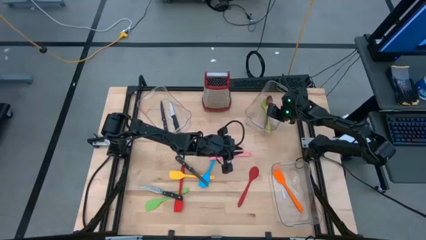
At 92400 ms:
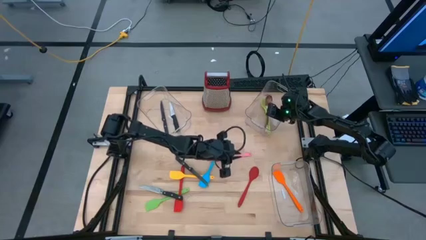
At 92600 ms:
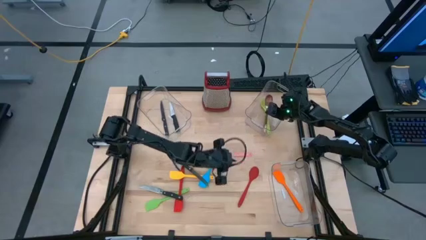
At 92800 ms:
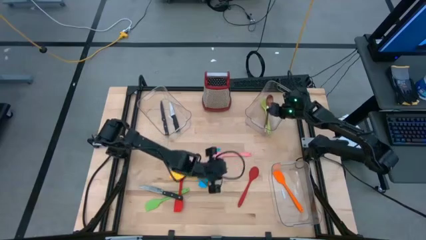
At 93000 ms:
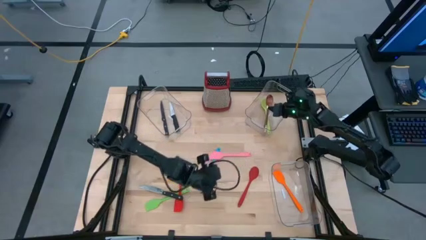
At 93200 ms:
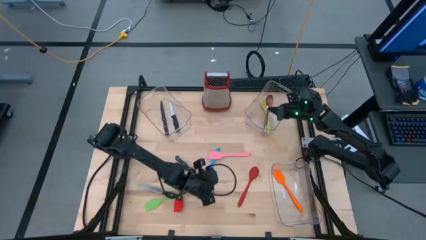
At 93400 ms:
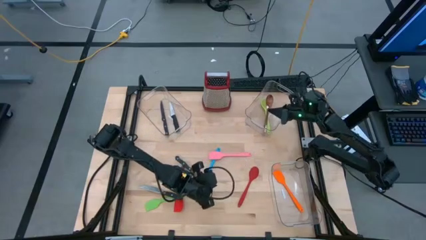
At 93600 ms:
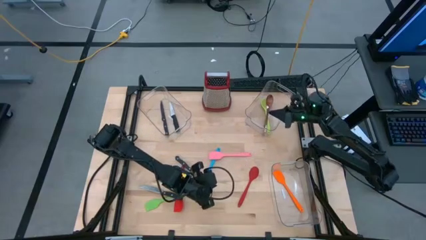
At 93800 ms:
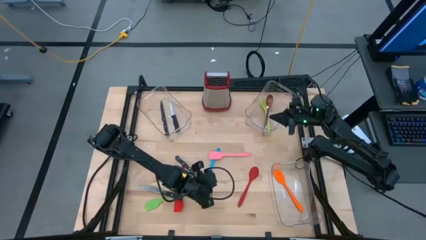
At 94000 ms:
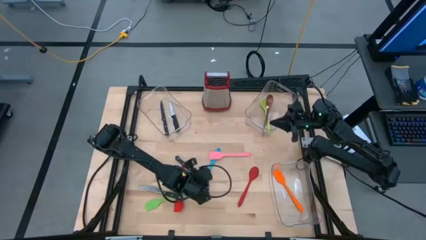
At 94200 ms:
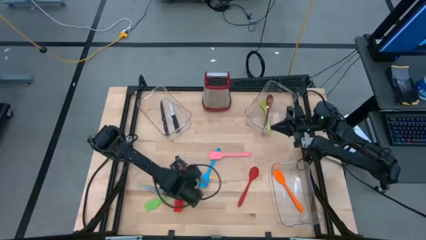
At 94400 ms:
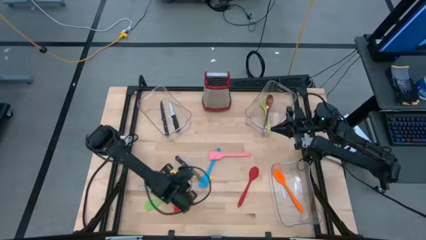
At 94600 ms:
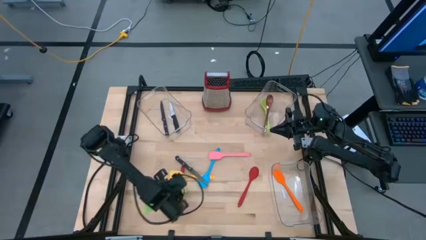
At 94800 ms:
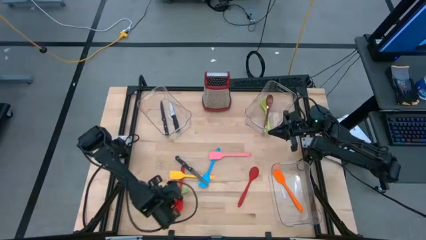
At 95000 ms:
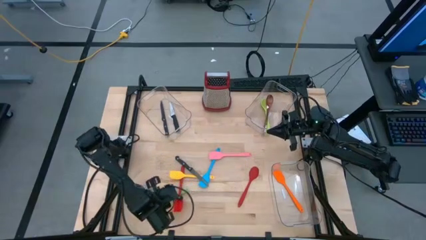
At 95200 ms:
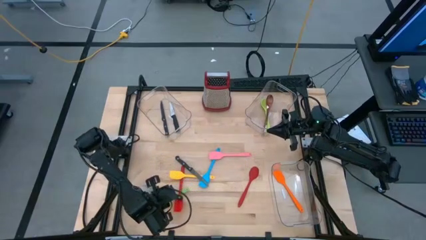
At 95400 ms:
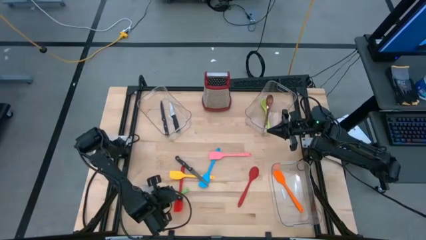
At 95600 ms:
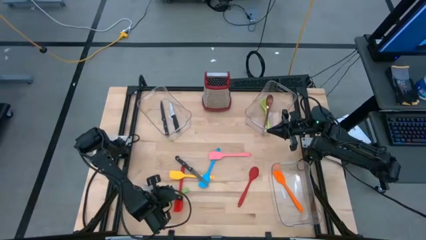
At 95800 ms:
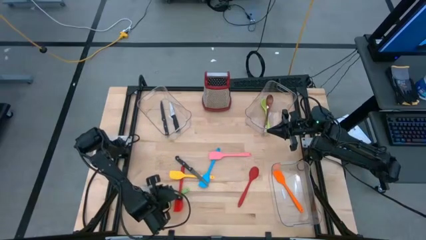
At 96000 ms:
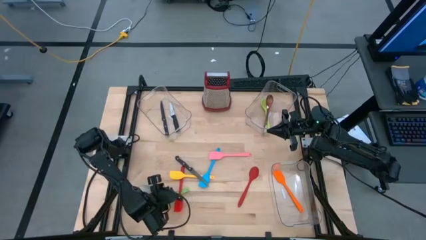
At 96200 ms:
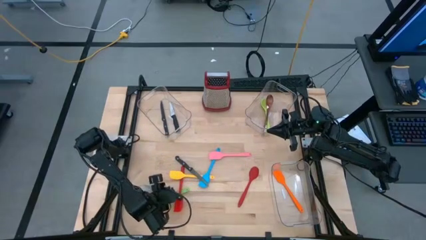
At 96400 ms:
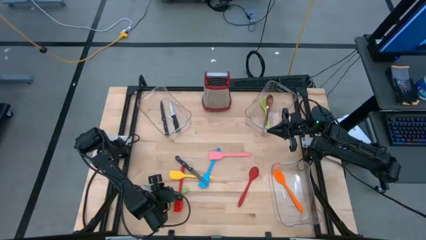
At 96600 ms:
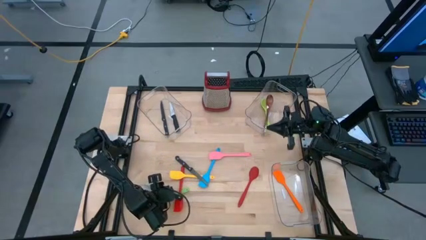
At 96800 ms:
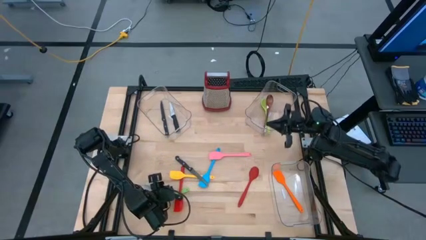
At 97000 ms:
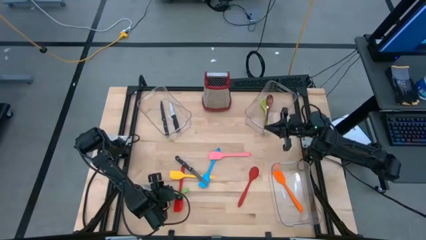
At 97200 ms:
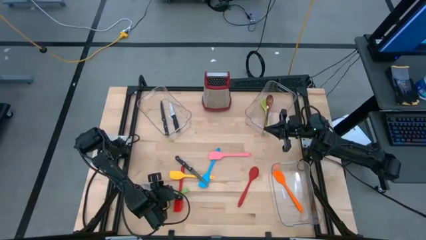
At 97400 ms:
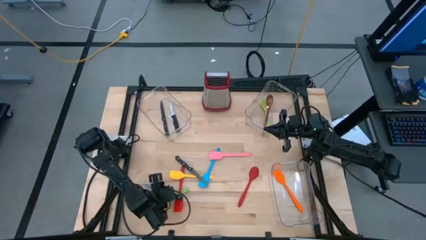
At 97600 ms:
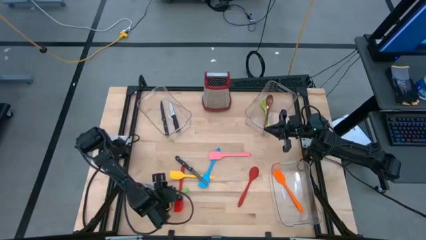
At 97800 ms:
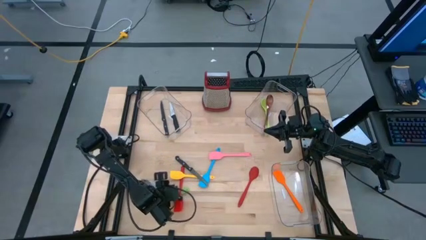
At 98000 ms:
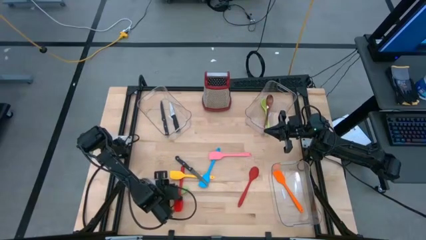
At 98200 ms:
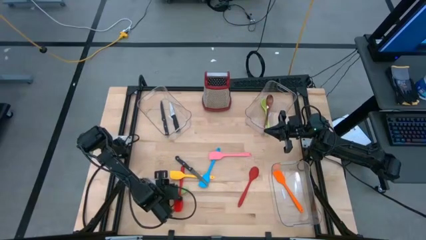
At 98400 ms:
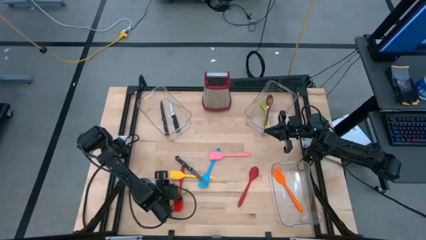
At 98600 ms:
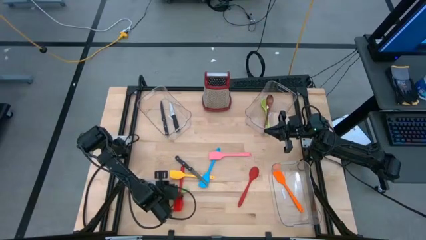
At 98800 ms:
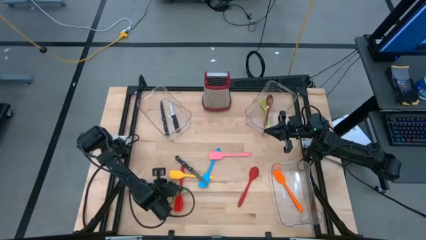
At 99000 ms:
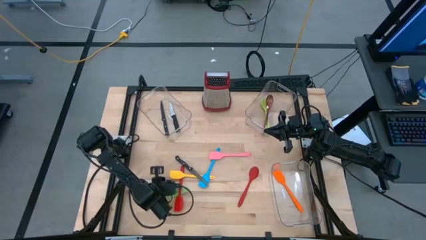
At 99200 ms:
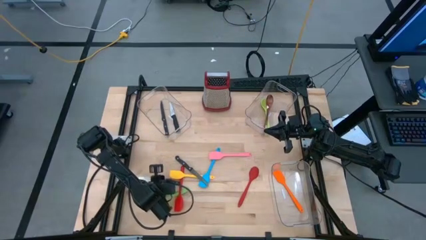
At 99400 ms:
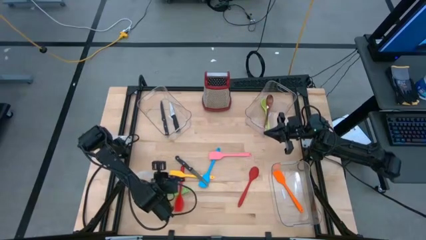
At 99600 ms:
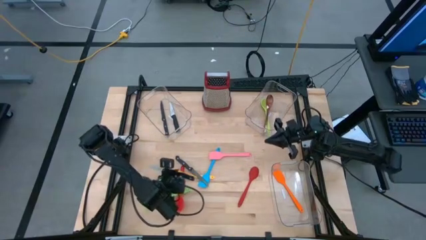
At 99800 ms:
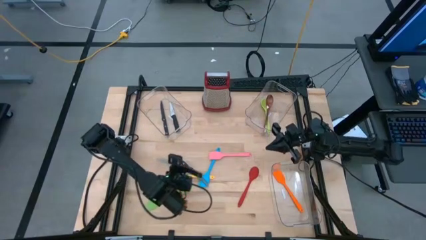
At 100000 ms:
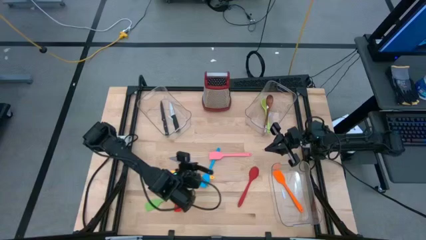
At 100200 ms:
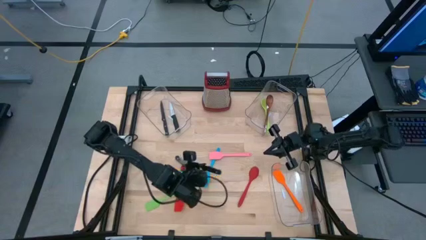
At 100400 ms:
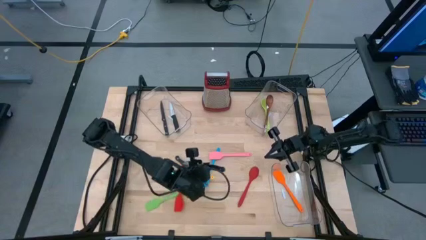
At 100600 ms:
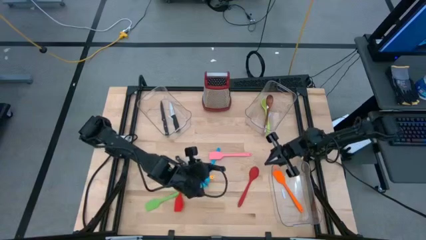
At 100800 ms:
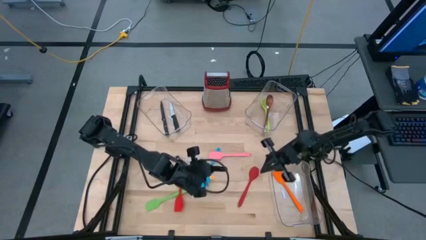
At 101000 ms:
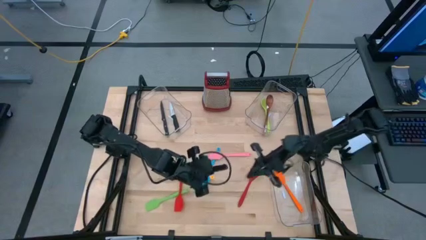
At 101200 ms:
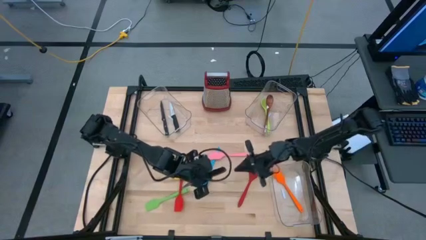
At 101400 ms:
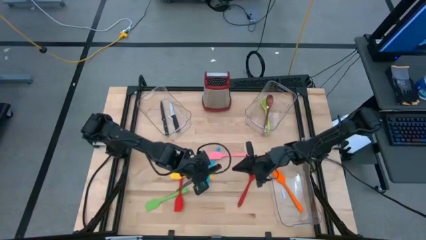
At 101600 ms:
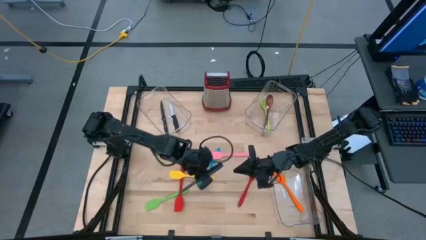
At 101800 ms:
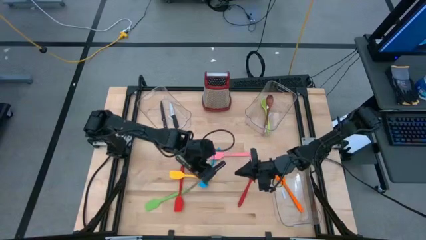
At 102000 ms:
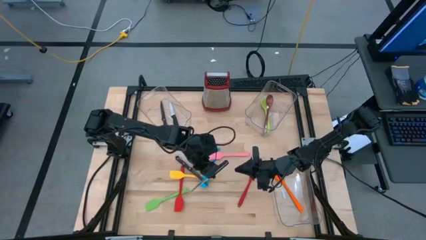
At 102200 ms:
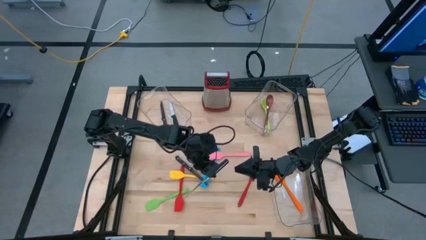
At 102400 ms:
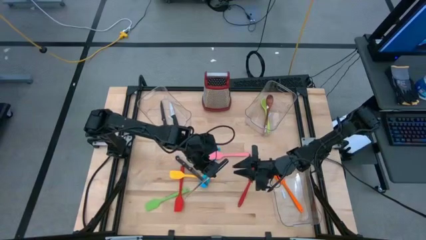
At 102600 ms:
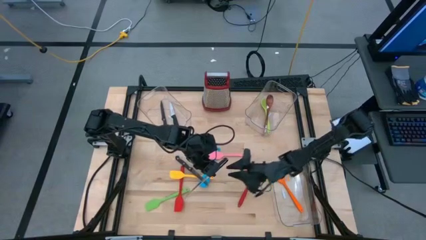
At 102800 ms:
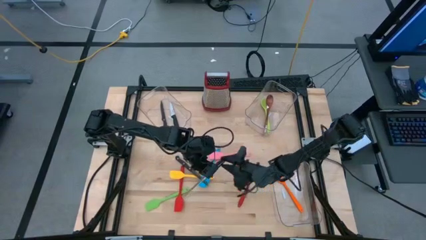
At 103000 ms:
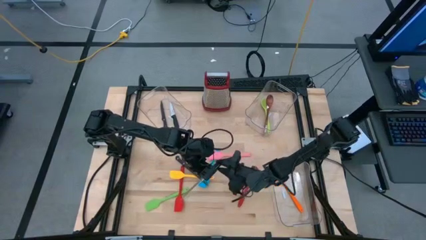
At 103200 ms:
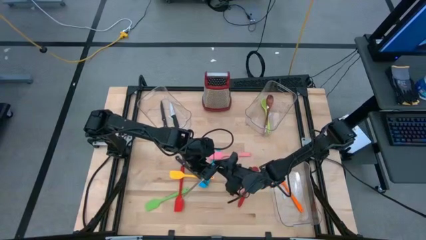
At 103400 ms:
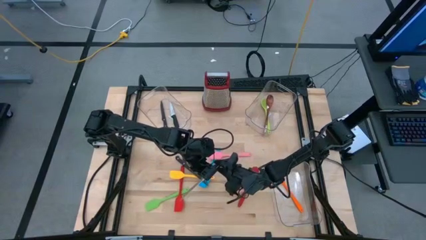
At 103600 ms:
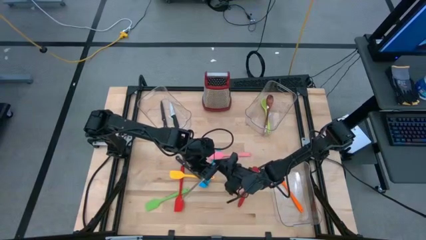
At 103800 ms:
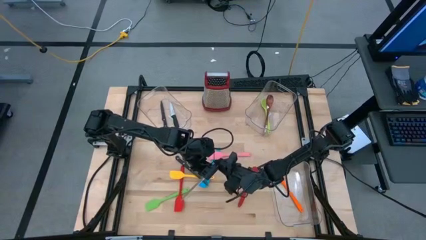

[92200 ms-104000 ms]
Task: Pick & Place Kitchen Items
Put the silver knife into the top left transparent bin
